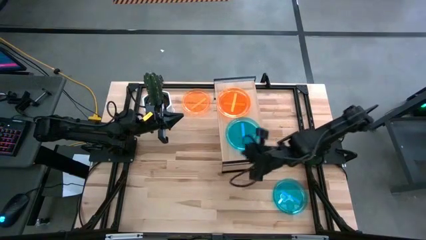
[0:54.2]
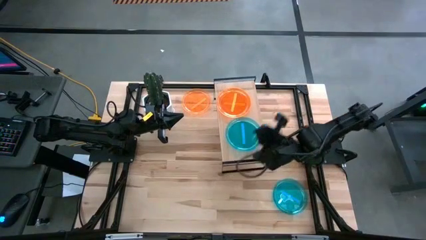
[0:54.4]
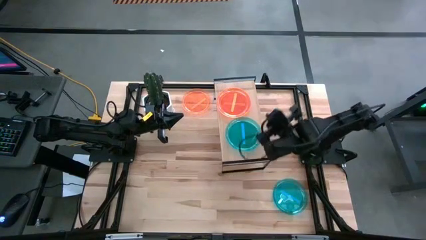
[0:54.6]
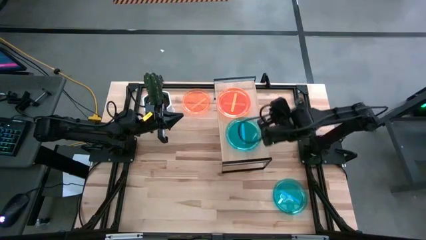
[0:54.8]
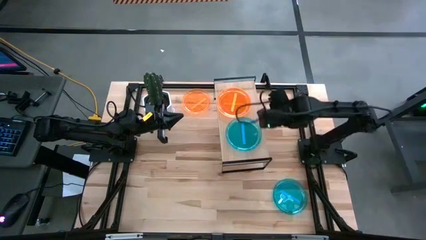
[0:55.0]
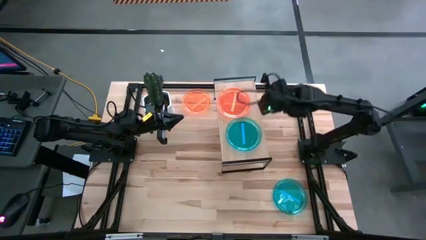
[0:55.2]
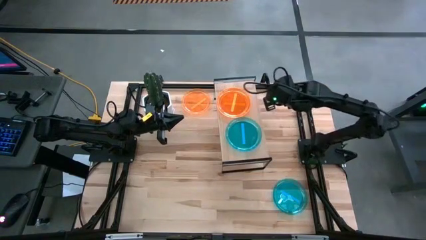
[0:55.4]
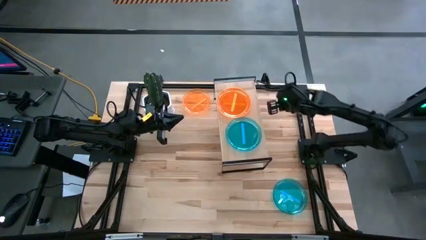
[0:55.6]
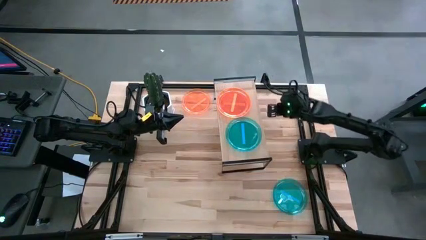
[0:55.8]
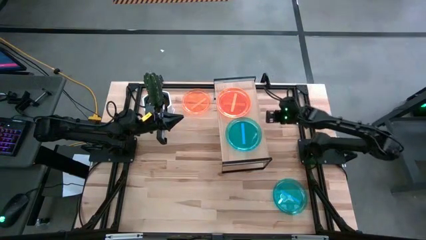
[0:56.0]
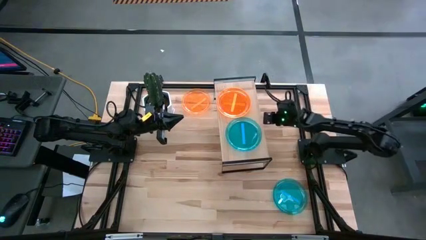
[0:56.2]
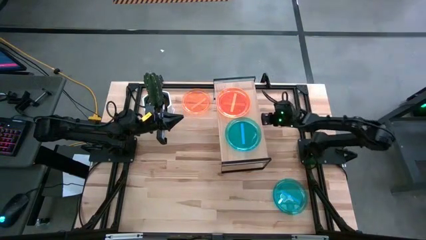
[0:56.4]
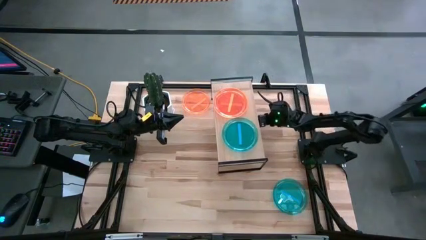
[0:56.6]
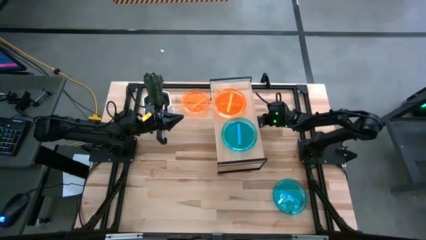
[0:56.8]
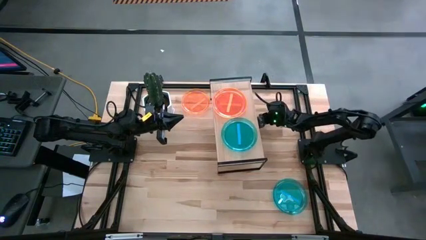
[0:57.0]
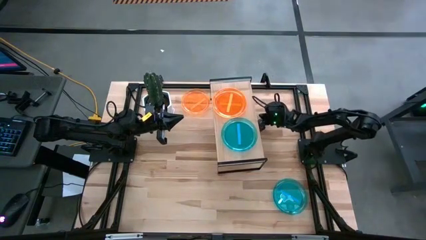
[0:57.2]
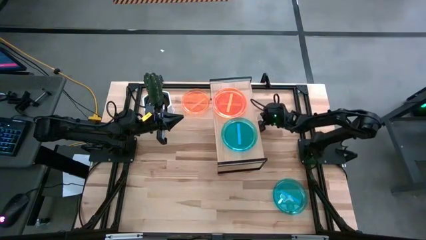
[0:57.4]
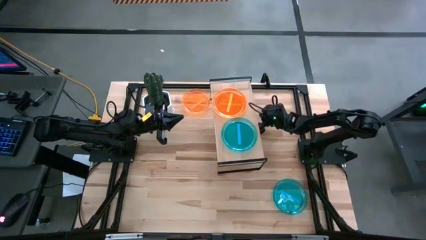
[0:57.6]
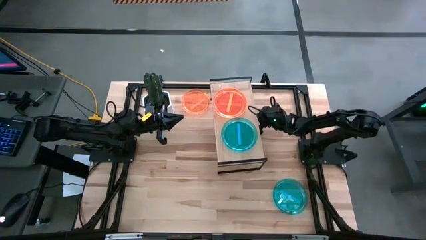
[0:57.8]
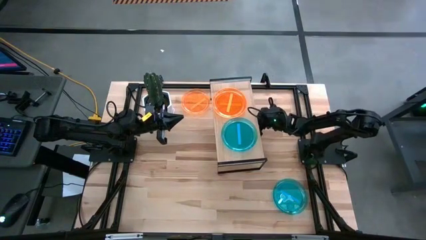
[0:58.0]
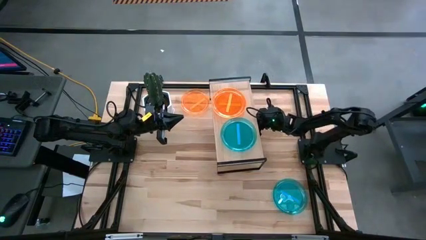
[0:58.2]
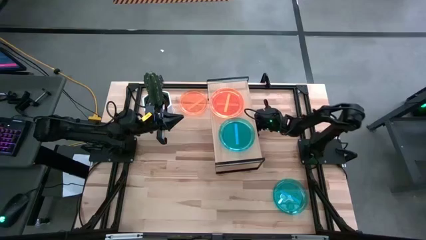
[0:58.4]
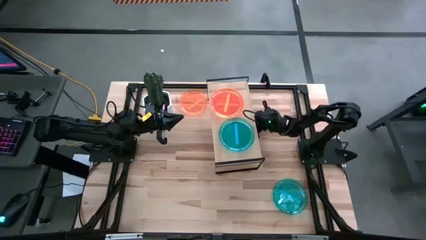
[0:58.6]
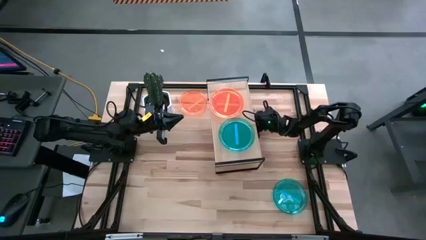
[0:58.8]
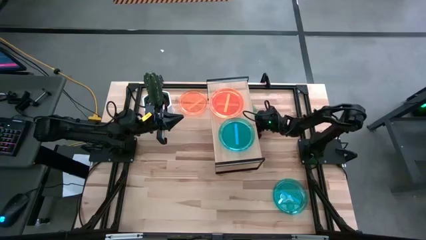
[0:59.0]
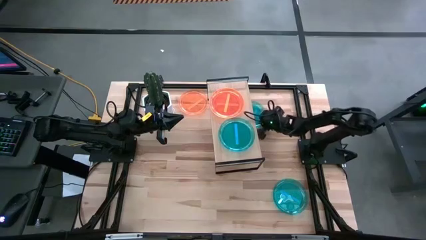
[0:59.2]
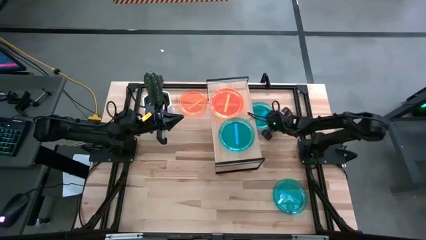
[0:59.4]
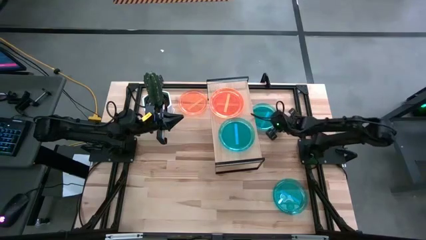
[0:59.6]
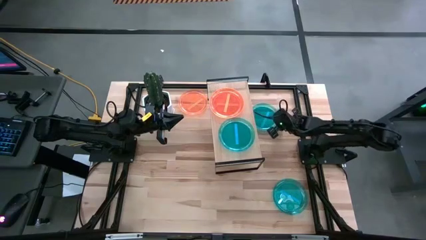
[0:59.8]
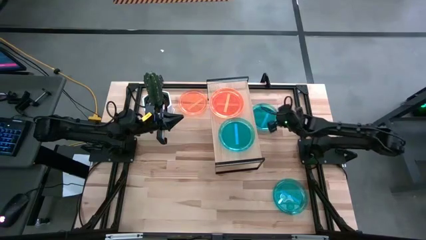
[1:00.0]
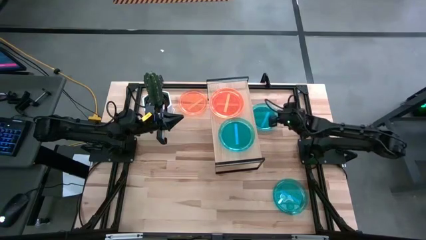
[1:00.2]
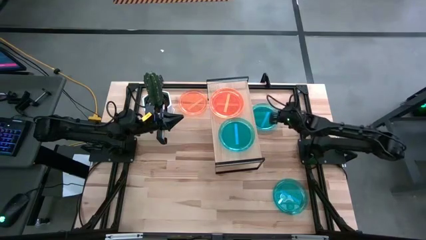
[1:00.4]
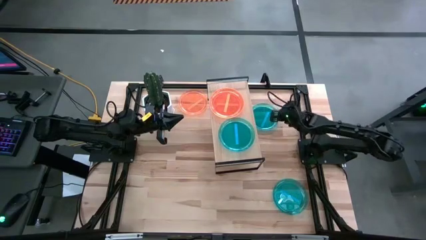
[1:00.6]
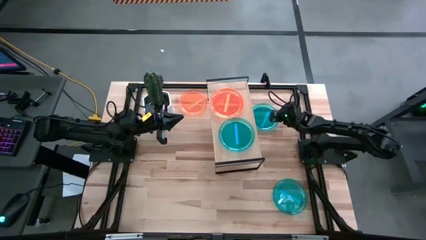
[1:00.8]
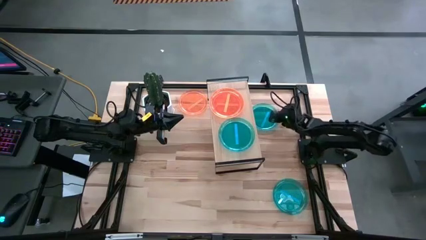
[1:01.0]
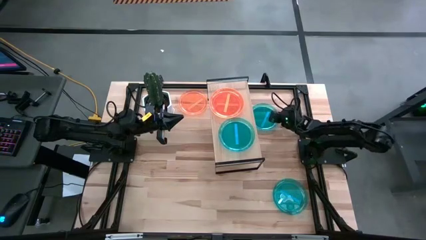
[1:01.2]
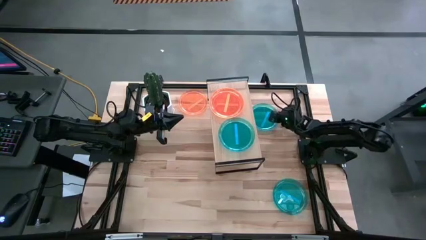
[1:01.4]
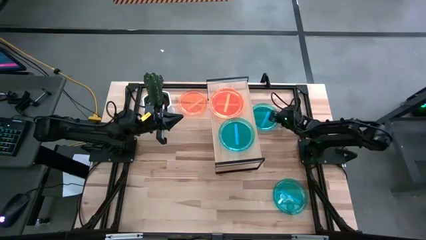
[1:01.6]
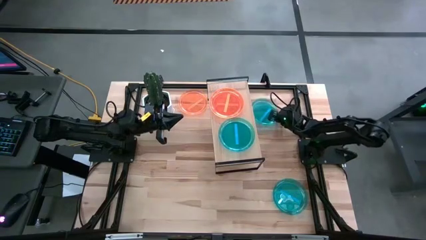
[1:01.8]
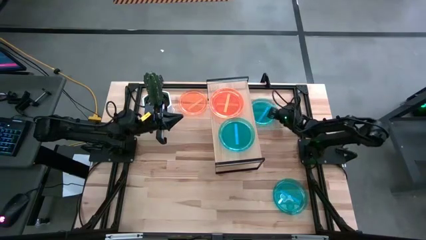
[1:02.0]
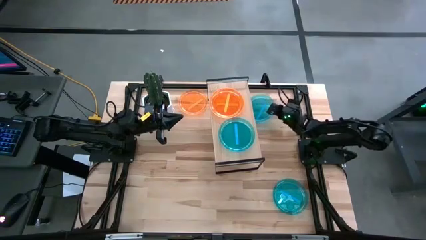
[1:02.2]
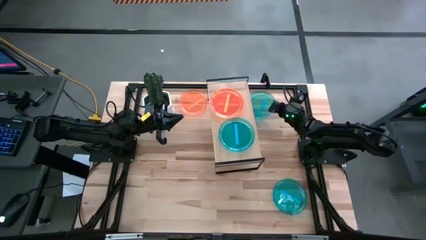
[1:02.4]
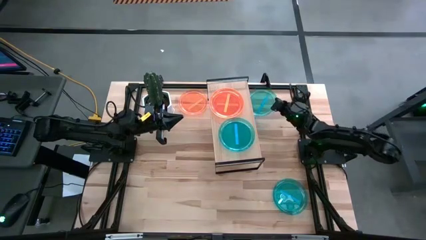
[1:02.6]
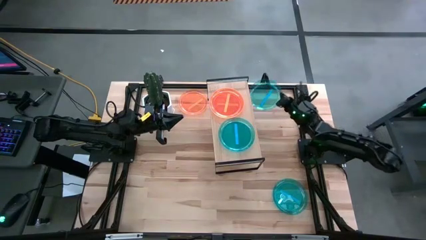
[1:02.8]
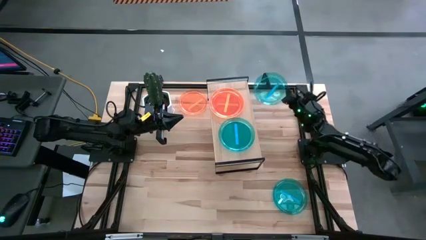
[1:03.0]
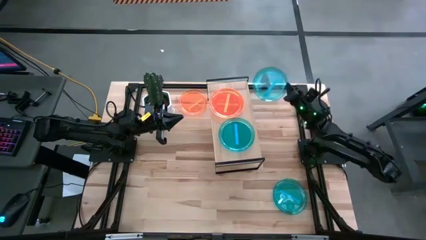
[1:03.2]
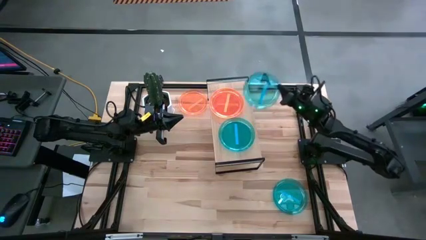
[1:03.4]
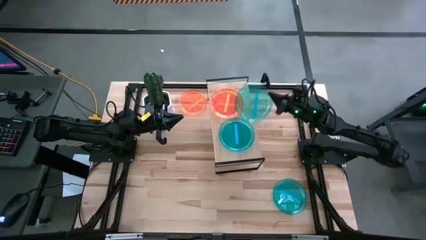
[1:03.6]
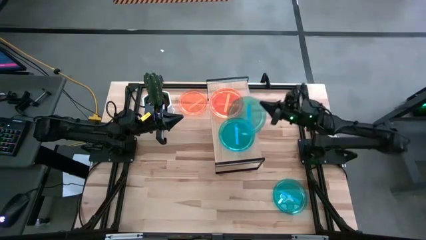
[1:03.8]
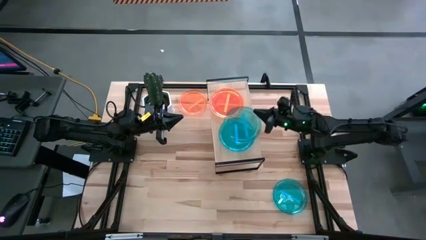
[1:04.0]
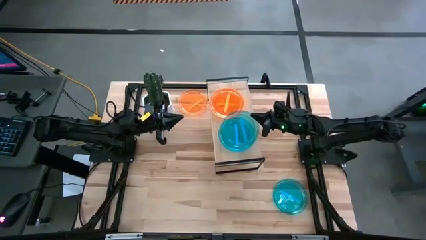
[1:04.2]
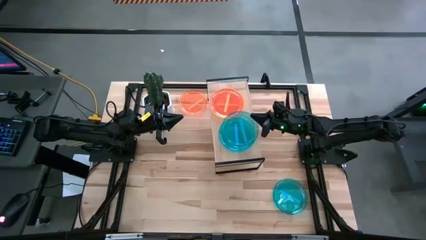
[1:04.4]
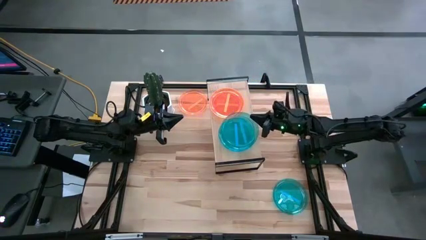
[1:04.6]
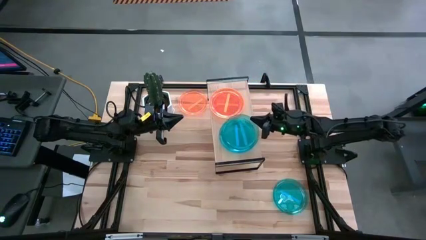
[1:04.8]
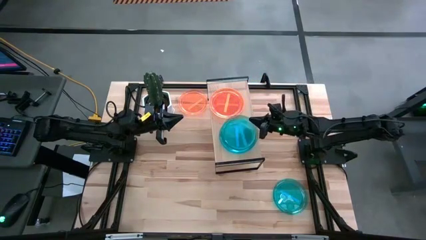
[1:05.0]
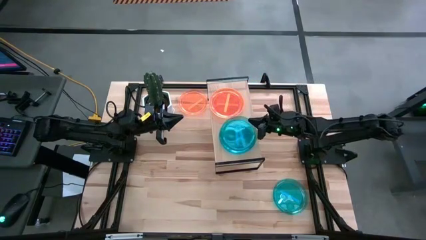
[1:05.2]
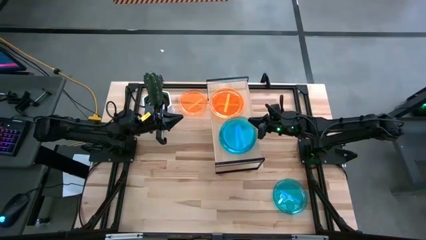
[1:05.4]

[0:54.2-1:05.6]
Task: Place and stack plates onto a shelf
Stack the top blue plate on top of the blue plate on the shelf
